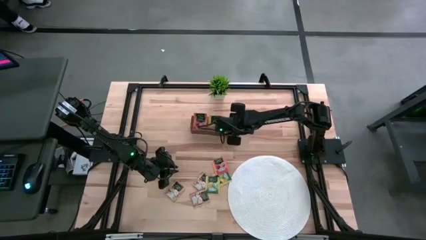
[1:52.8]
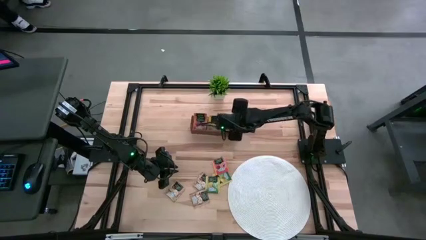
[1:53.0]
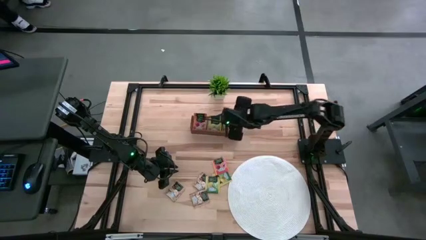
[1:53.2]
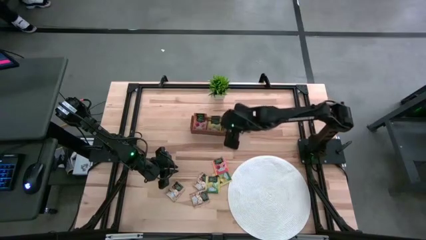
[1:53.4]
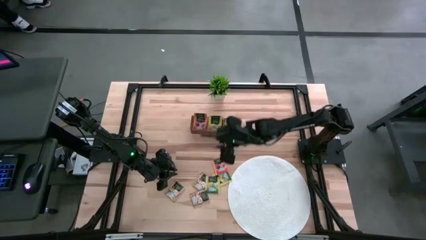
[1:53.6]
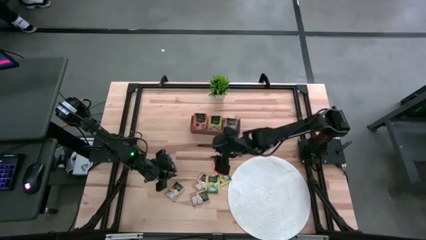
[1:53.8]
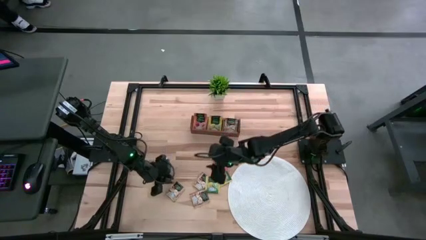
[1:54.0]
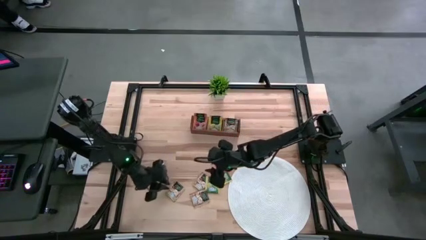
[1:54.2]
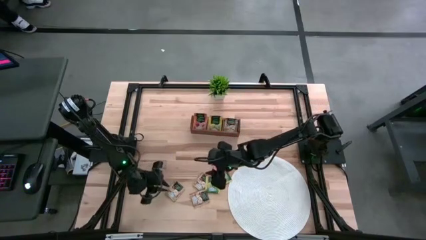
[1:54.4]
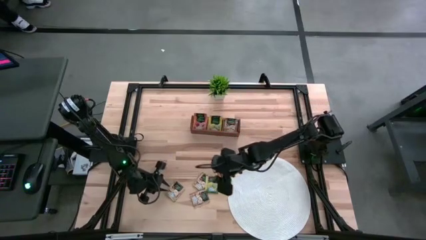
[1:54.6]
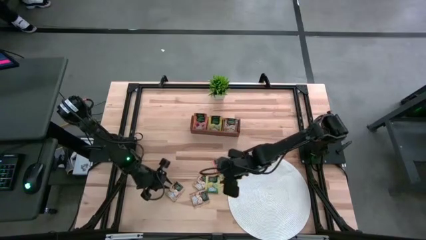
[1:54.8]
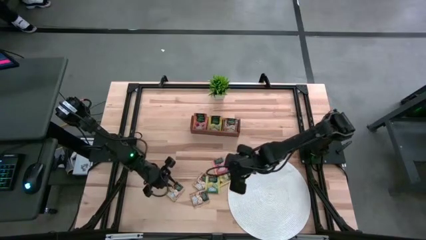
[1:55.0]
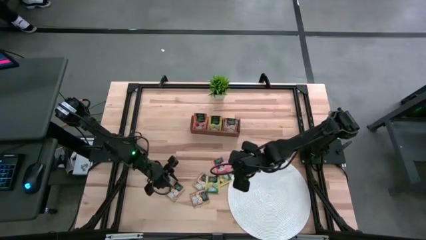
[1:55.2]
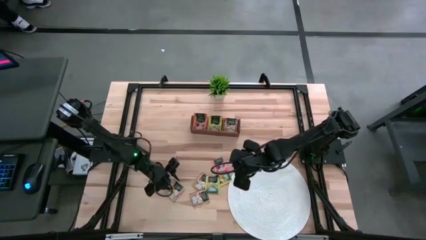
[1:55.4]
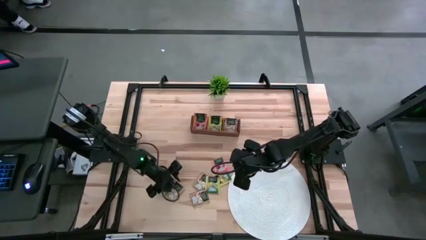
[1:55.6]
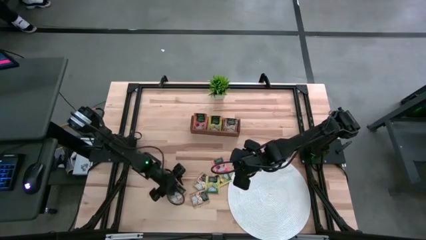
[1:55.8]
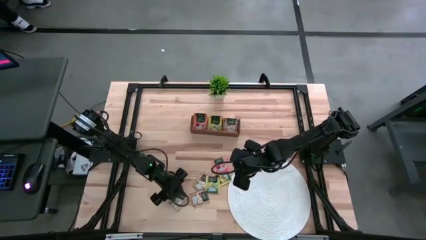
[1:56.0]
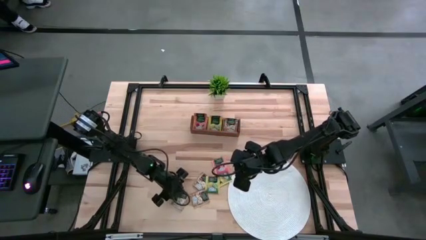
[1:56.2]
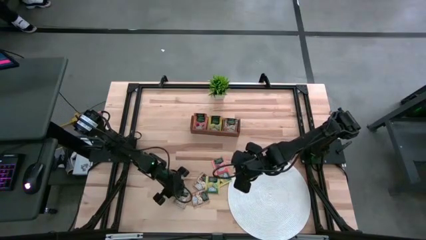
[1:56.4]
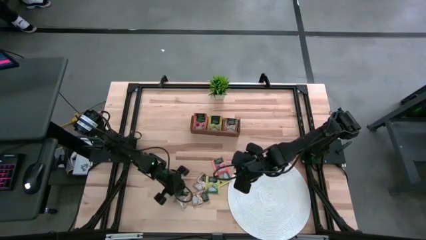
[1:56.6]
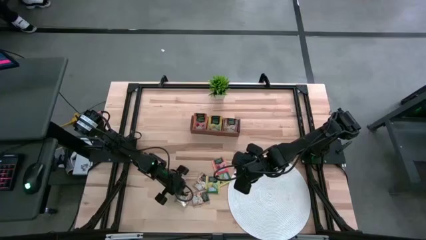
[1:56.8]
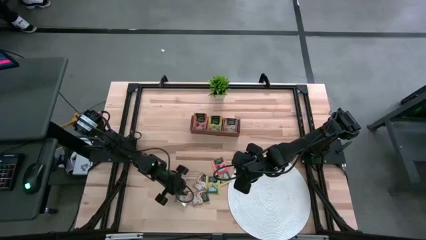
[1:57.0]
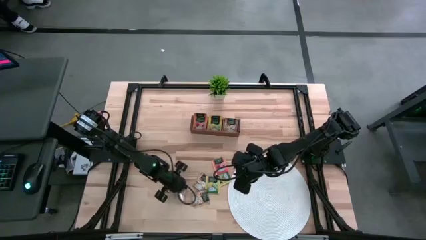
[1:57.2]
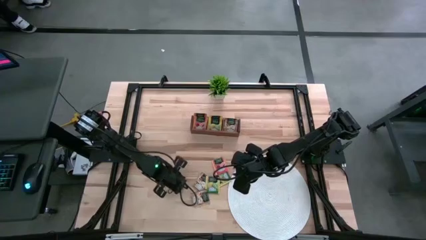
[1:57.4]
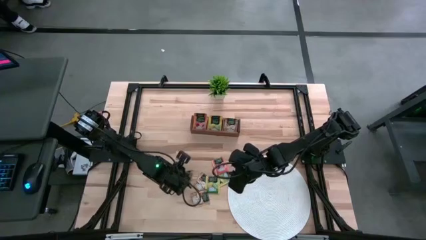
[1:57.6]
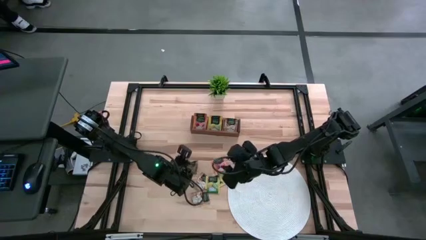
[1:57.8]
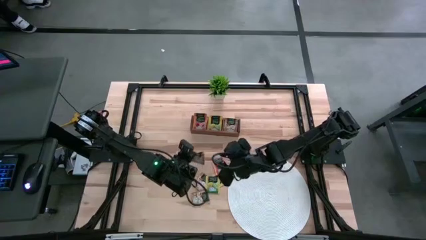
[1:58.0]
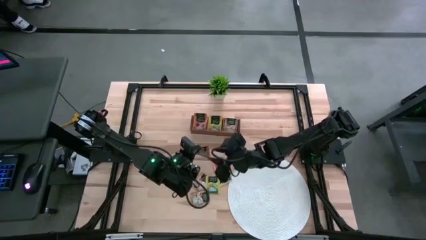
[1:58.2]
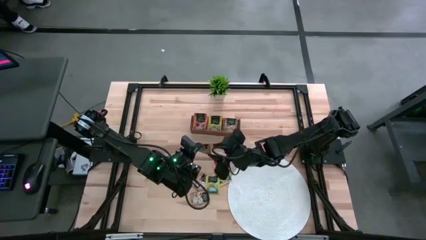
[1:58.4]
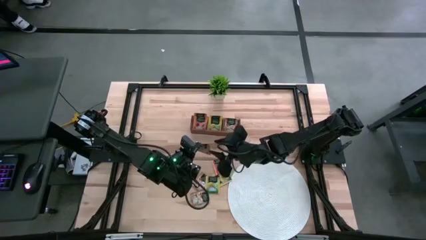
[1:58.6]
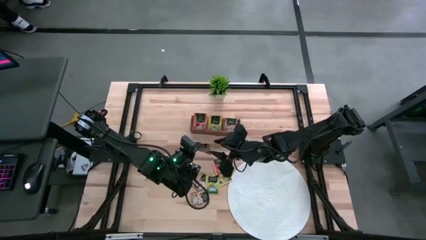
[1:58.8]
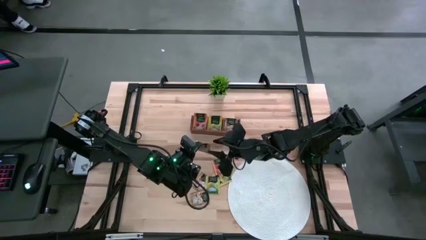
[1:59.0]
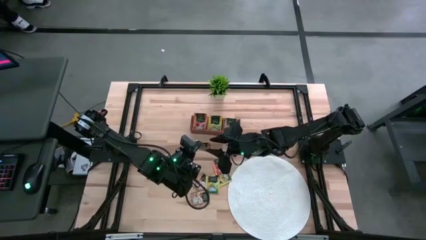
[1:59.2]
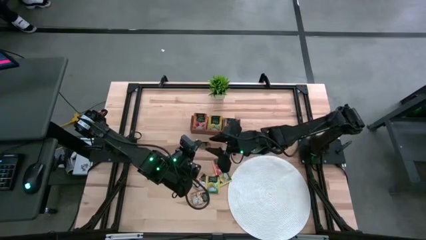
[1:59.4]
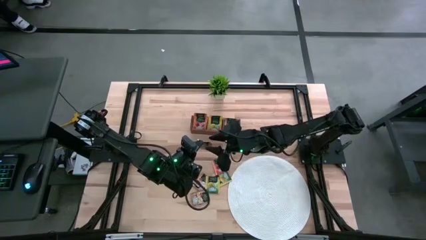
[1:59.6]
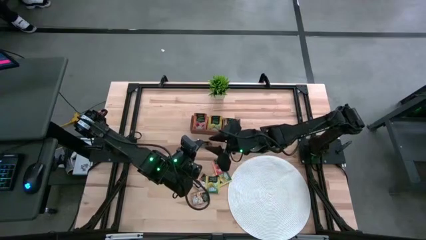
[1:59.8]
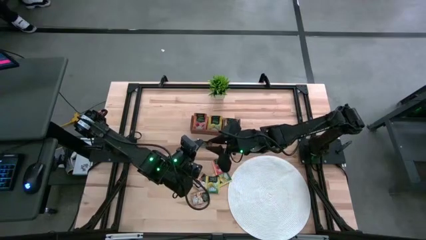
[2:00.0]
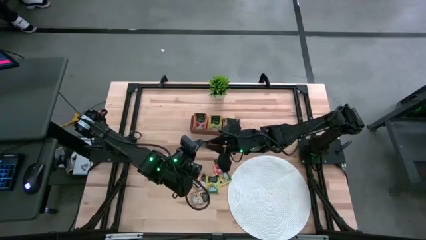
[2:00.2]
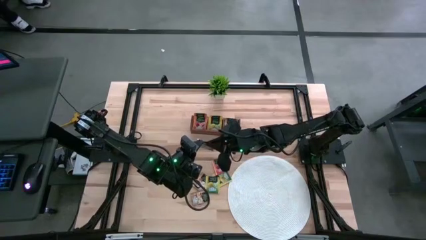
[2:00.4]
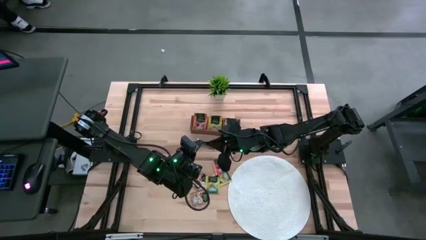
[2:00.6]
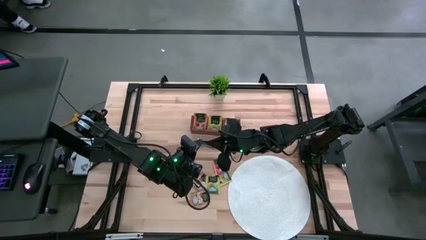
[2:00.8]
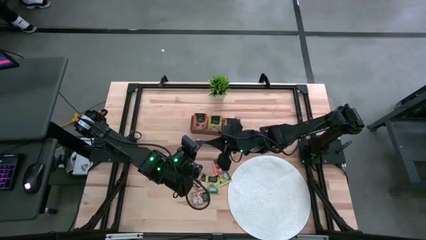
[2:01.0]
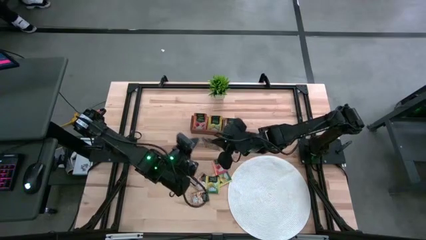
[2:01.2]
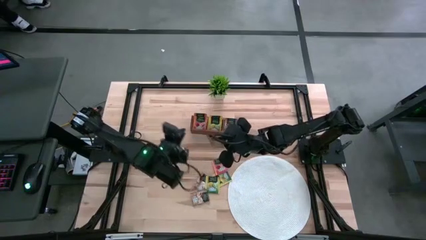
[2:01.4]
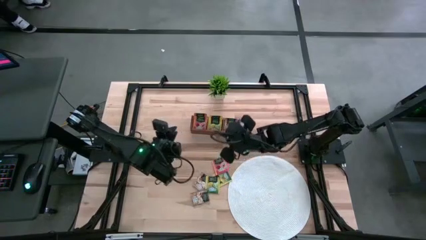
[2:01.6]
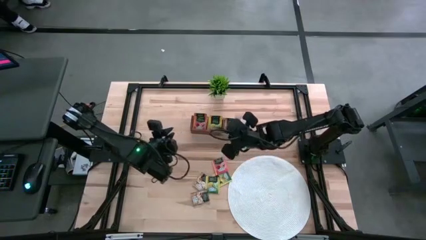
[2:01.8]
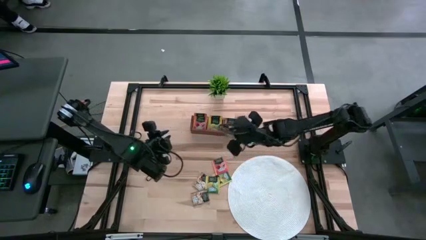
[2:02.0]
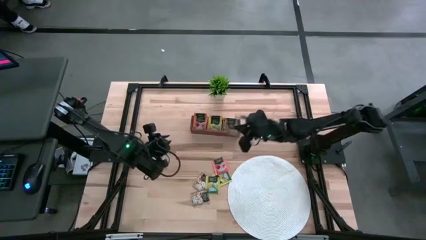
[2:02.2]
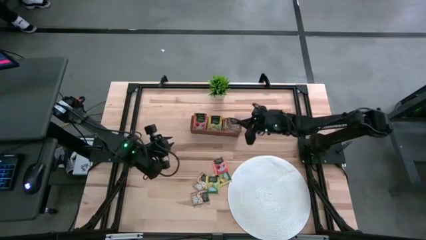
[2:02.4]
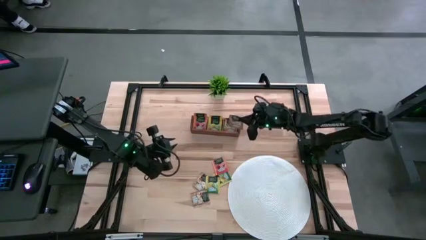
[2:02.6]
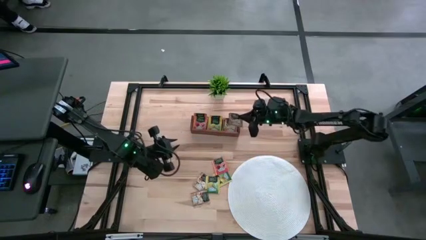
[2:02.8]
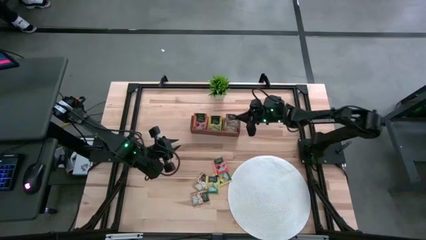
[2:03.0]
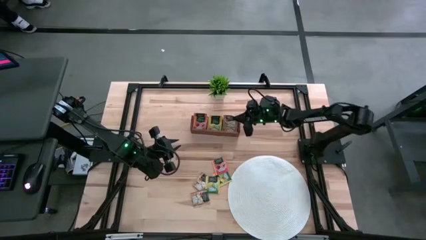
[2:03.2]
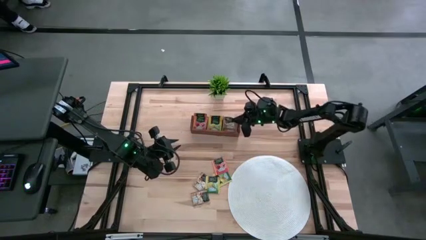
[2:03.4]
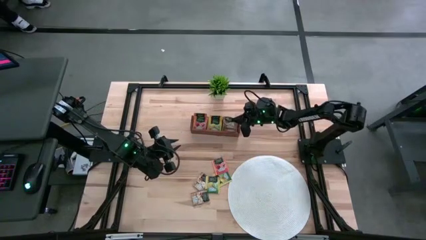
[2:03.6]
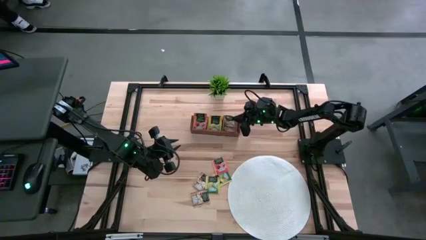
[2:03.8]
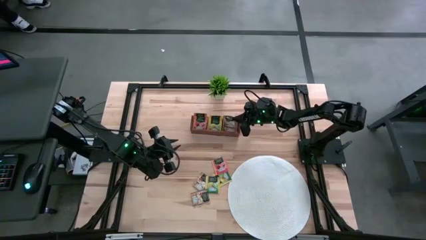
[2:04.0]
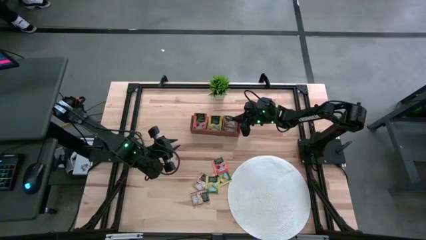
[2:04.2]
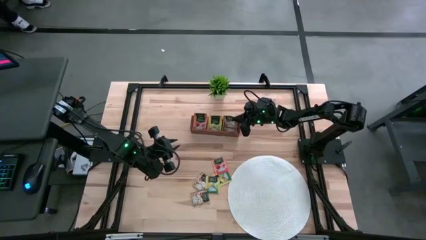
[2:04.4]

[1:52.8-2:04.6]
Task: Pick & Place Tea
Put the brown tea bag into the right section of the wooden organizer
